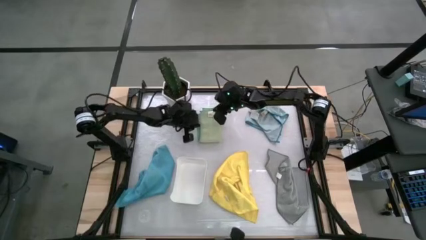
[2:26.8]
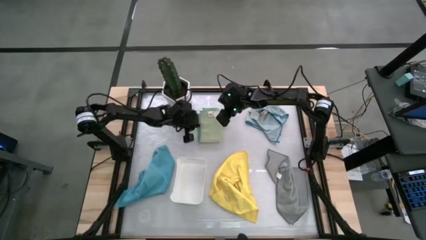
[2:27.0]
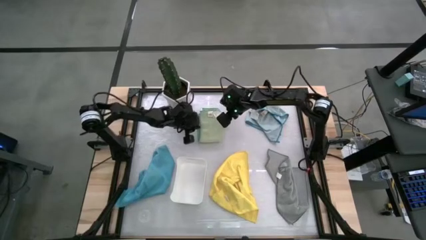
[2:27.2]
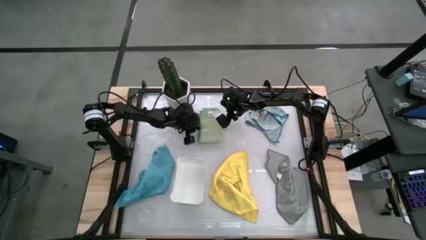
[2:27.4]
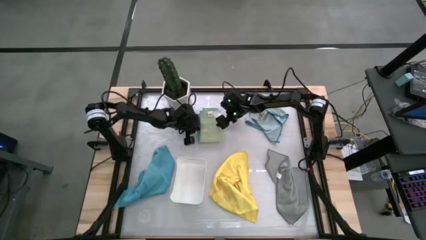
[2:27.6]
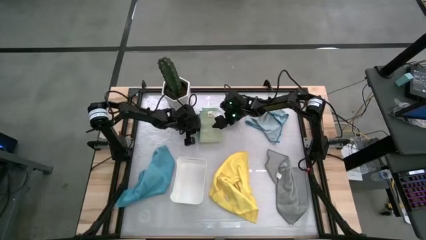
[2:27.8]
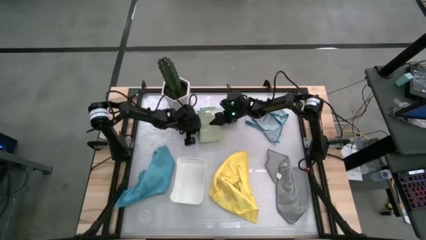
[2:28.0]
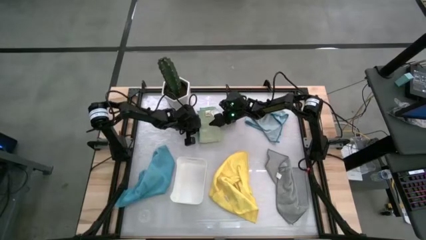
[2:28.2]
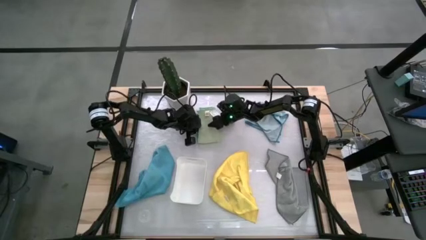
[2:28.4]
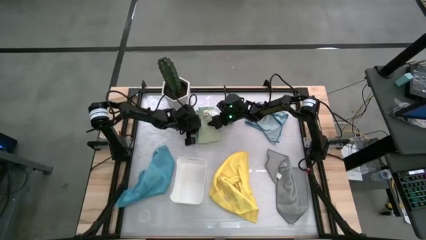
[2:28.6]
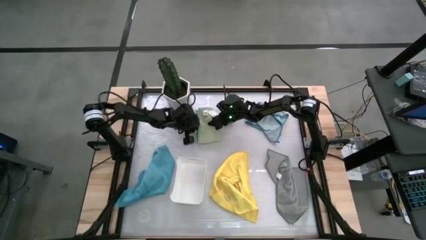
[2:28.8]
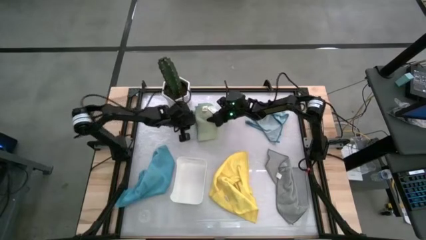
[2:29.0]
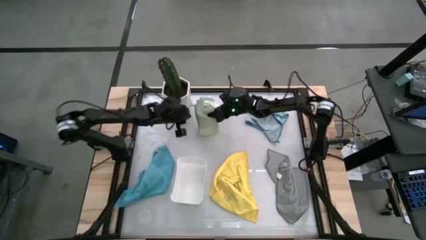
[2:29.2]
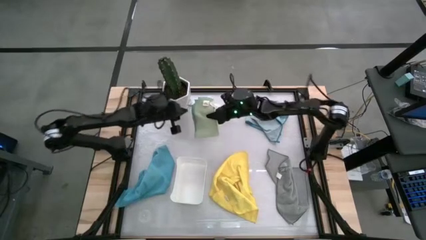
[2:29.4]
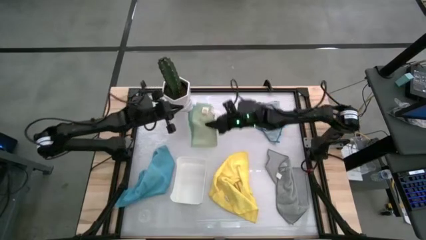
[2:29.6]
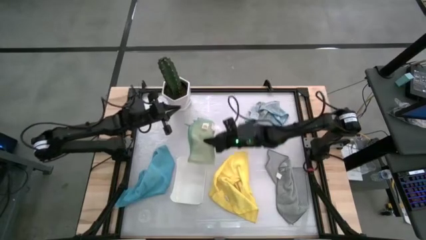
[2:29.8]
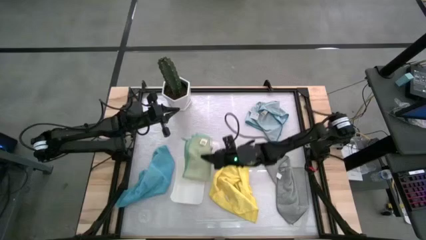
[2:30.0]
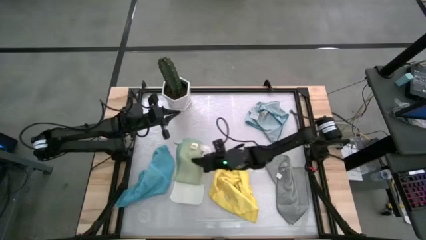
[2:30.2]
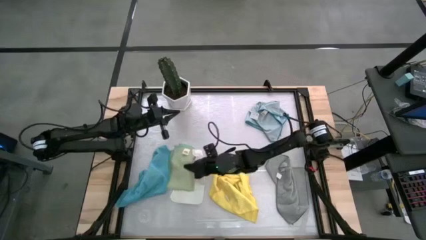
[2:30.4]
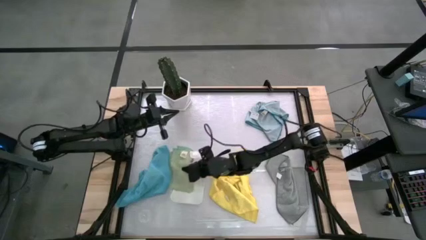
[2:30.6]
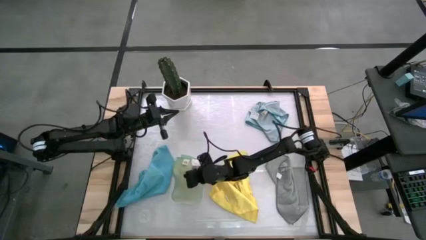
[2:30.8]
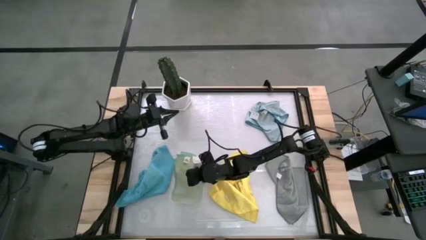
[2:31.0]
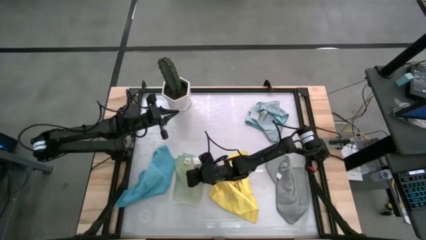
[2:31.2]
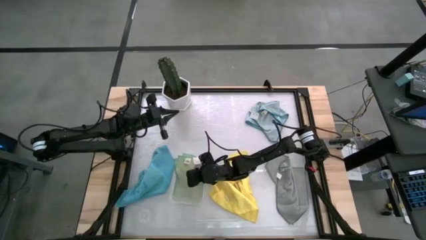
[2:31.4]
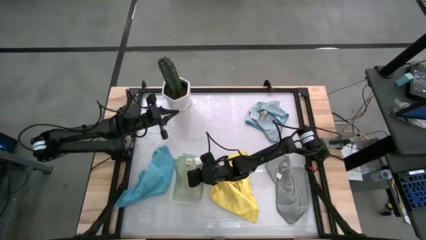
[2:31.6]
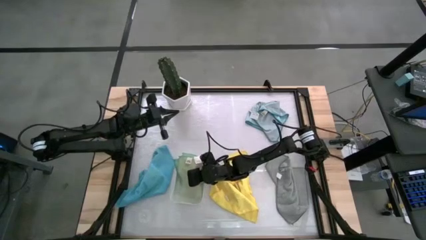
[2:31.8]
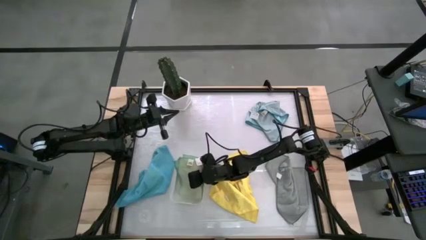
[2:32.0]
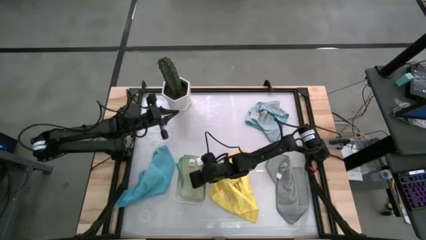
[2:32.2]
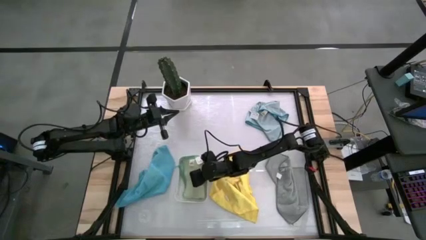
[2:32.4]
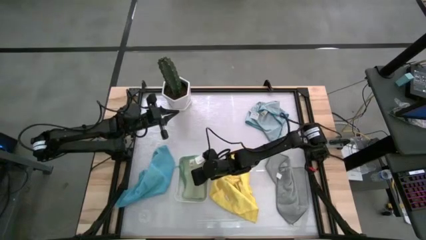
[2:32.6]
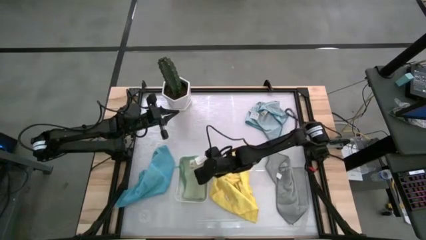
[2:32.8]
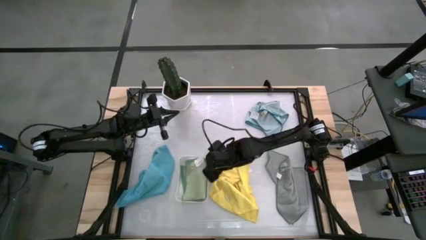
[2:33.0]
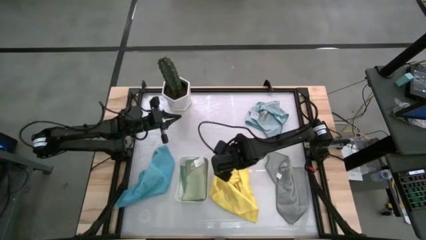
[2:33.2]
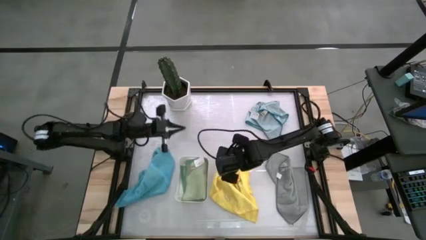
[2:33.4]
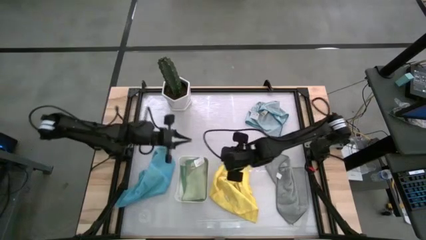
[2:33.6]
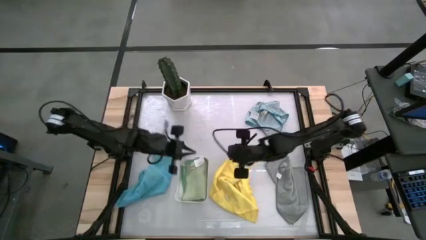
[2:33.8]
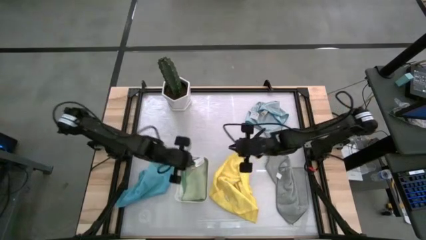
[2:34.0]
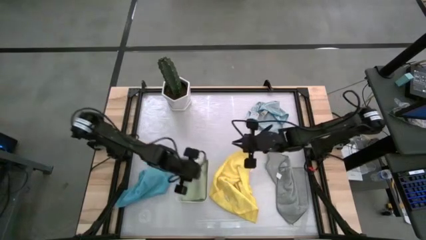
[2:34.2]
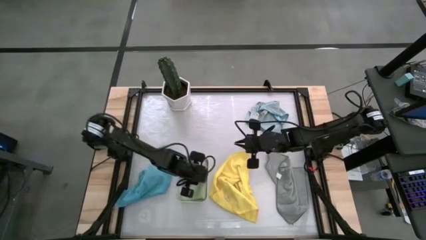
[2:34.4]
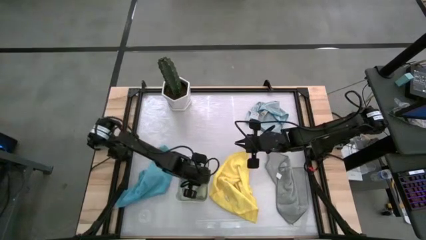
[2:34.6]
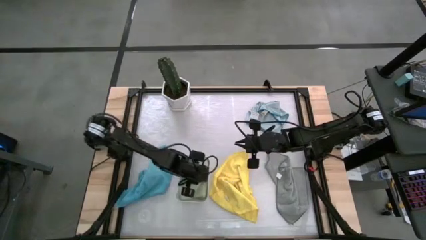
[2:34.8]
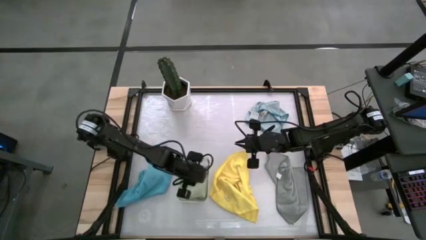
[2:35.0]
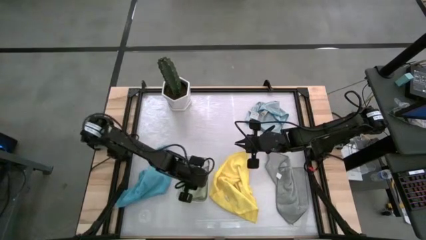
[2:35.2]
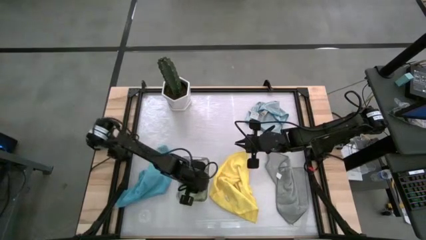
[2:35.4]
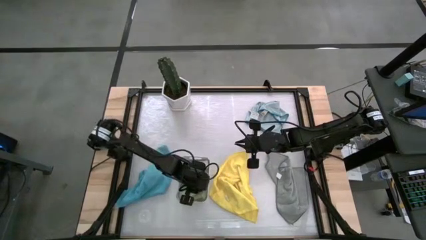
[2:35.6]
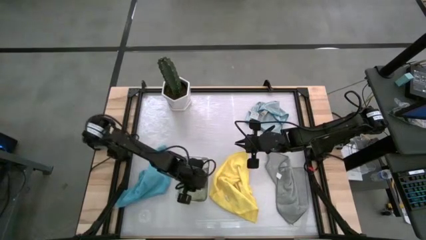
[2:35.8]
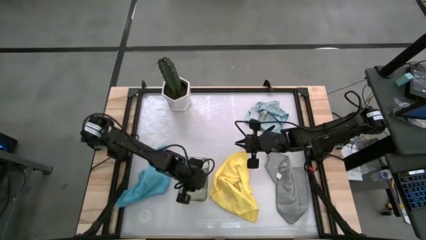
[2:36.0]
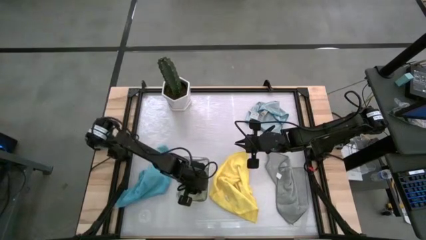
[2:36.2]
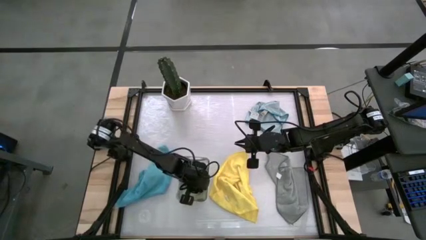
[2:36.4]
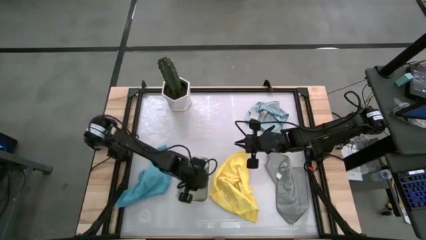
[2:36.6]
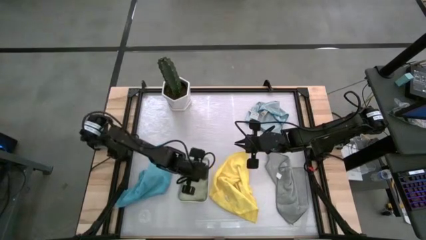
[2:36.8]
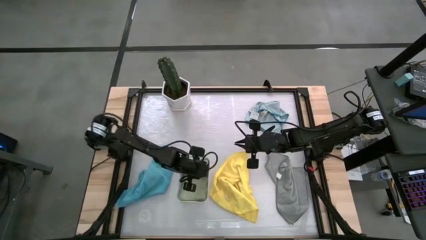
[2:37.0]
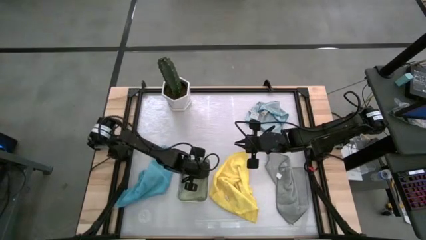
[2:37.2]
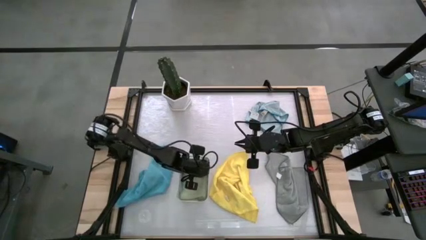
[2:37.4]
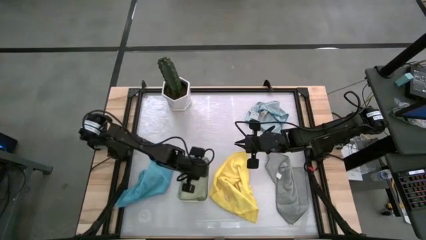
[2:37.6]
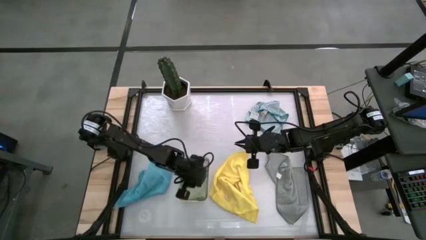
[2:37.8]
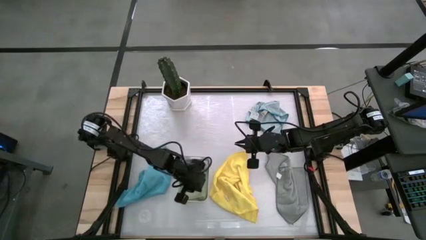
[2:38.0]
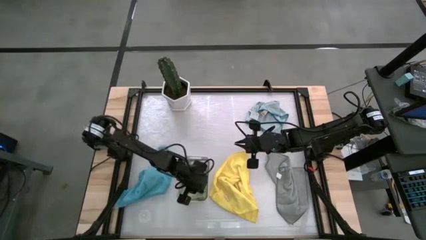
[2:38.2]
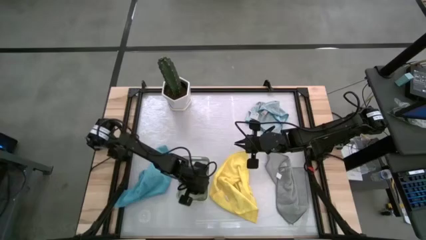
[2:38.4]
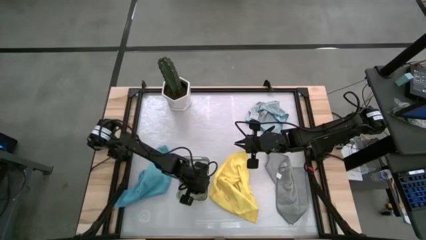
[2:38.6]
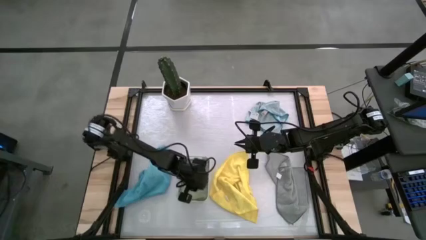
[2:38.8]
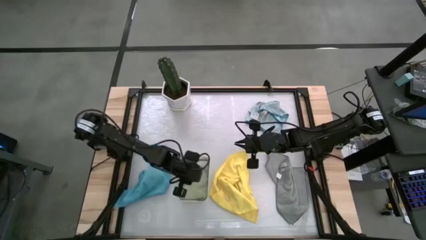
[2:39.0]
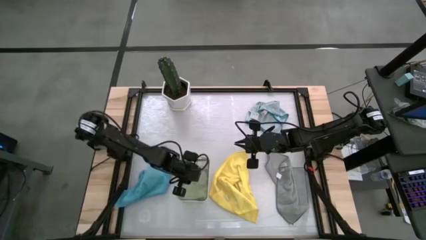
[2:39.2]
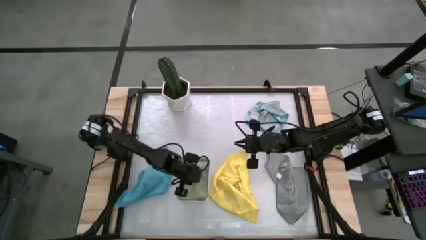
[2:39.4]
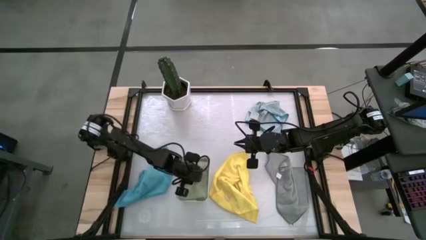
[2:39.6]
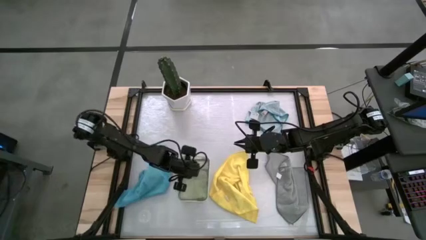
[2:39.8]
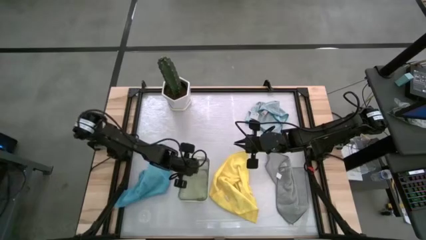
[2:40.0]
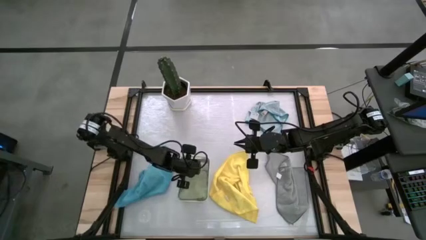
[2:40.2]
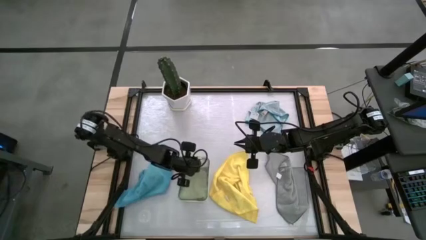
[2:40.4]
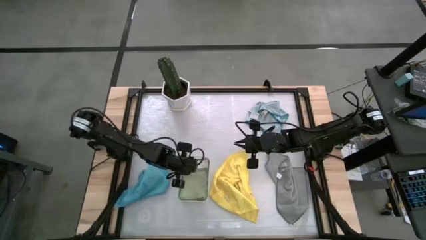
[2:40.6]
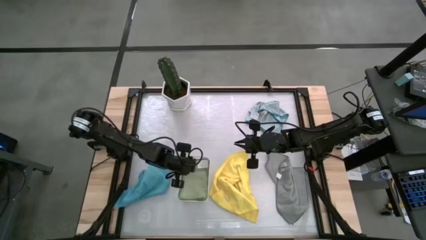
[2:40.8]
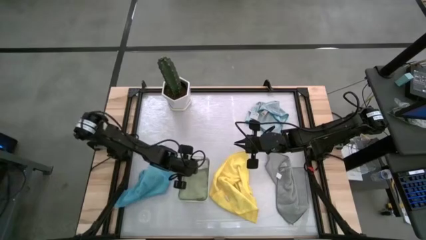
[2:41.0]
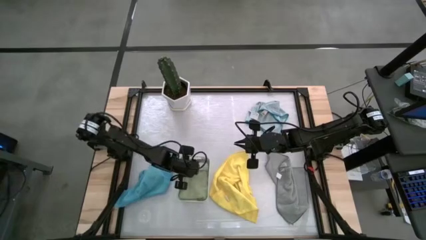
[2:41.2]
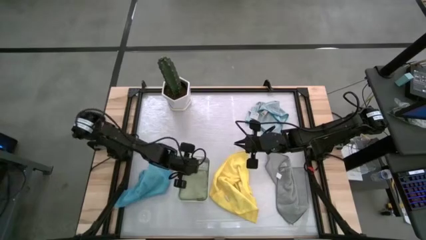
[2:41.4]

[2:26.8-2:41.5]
Task: Fold microfiber towels
Put the green microfiber towel into the bin
